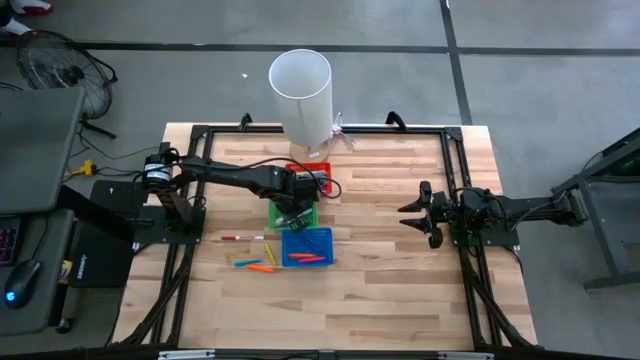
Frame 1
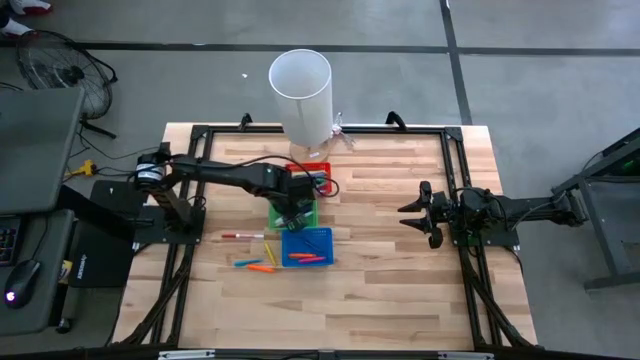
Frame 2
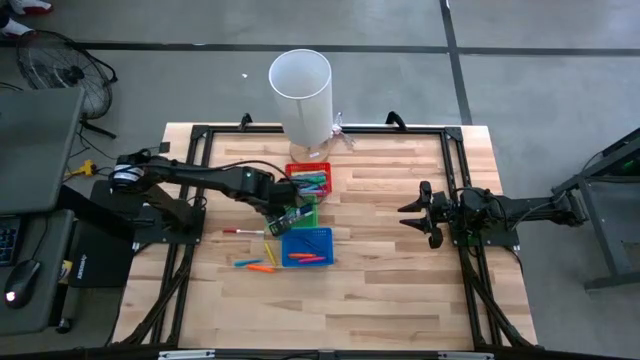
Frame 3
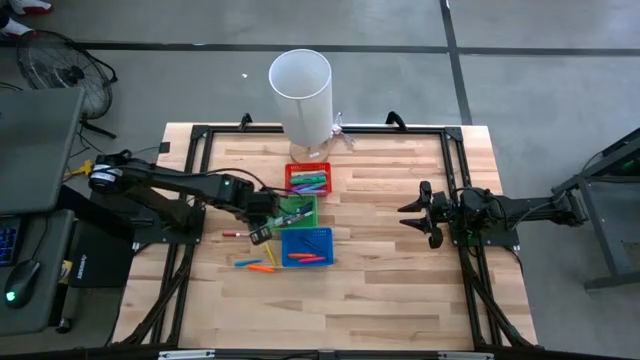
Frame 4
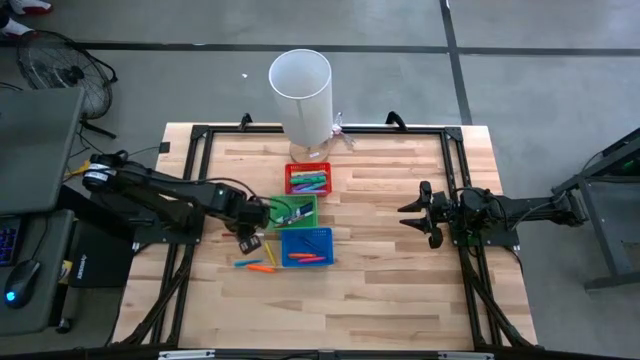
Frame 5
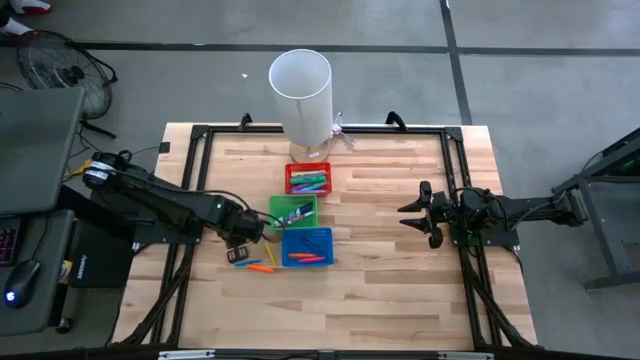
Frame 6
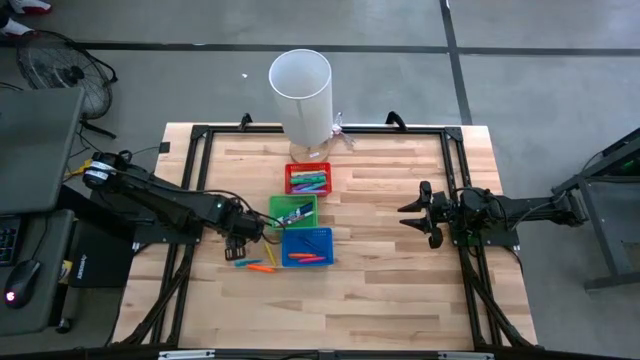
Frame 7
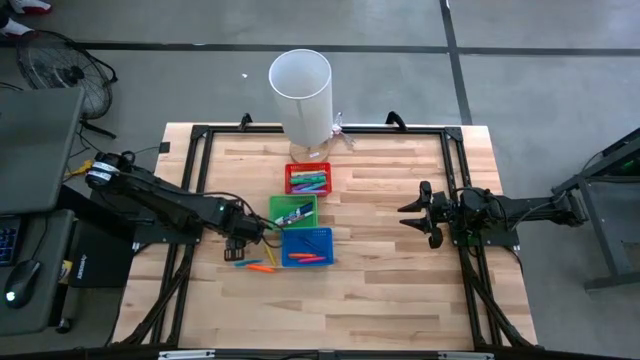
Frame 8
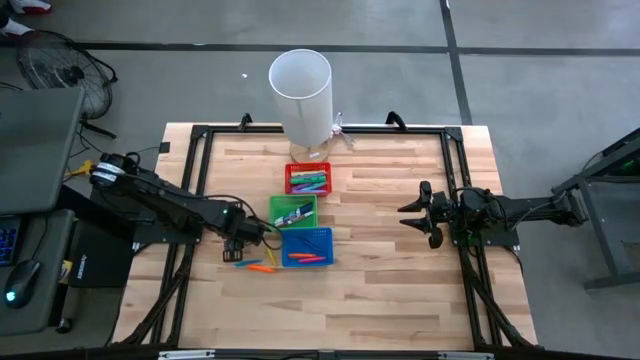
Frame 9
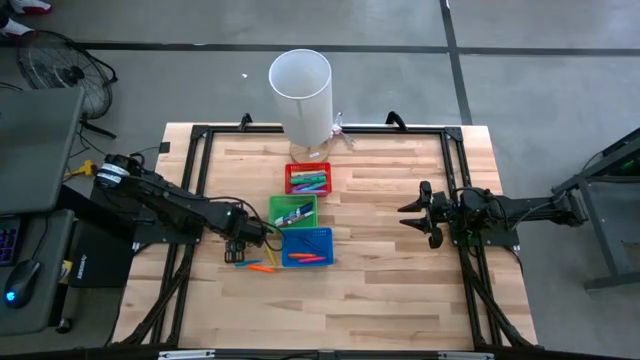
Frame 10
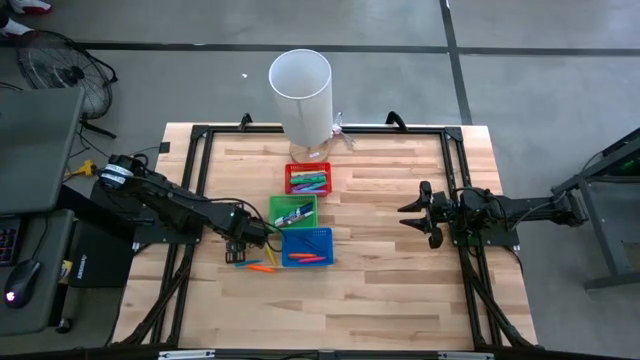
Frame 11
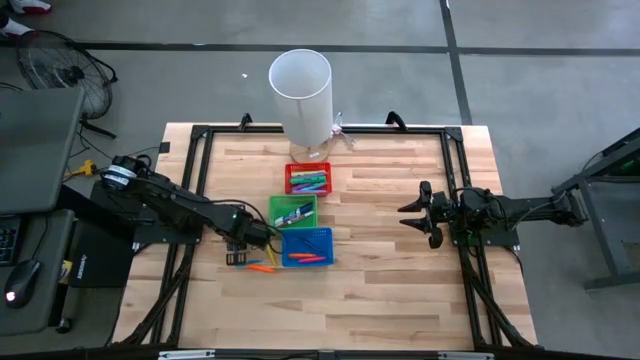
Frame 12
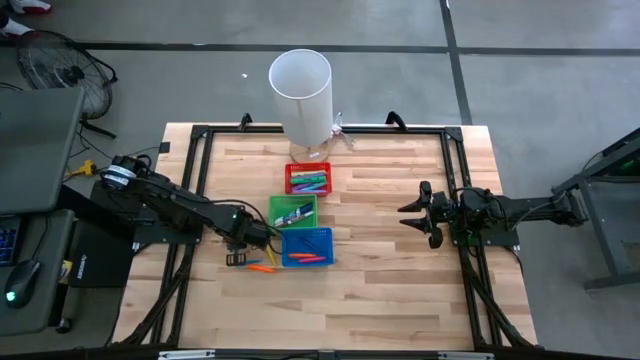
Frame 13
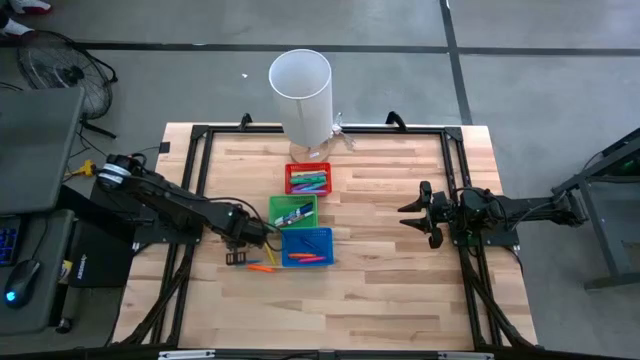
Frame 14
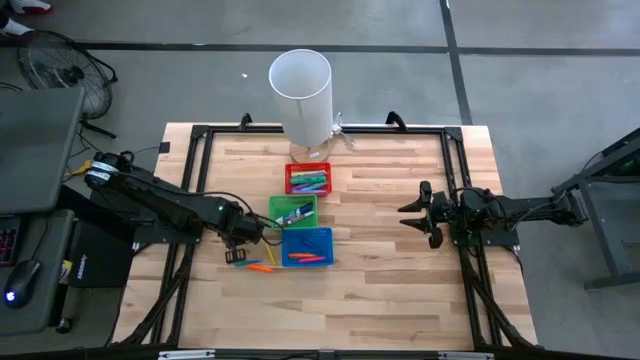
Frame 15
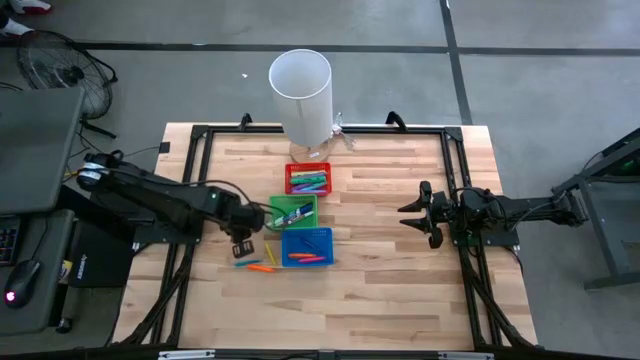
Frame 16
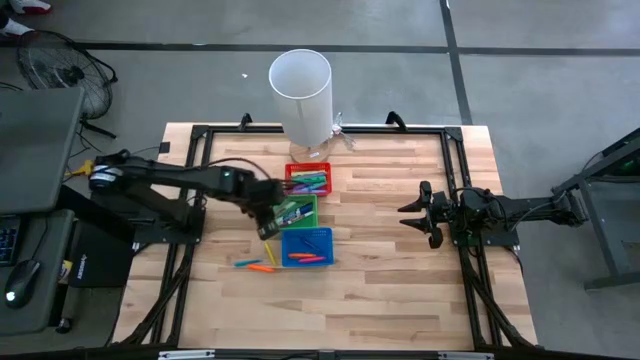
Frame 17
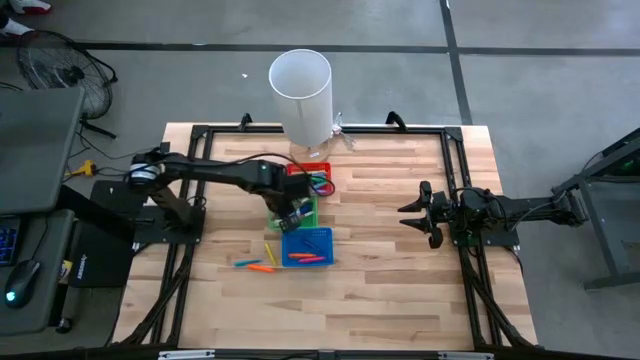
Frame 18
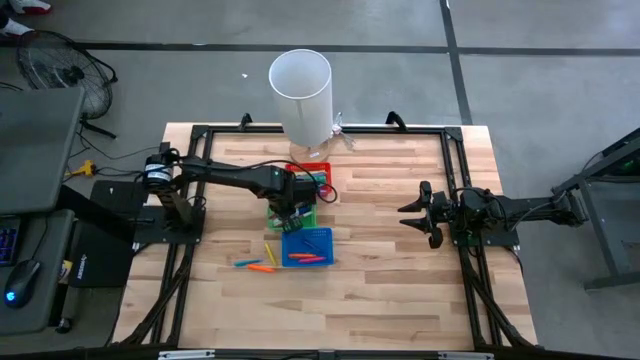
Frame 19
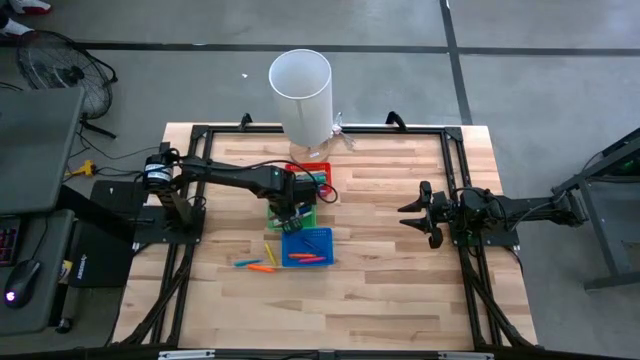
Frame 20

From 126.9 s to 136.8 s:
Task: Pick & Place Markers
Put the white and red marker pen into the green bin

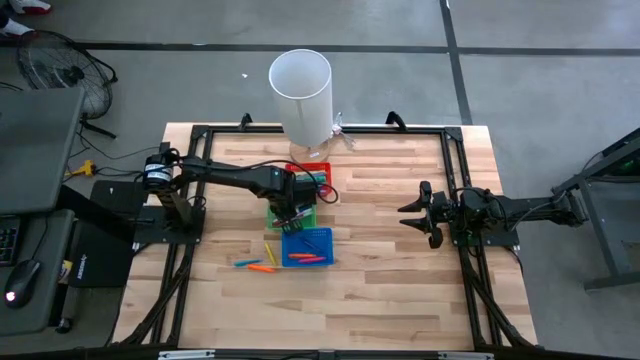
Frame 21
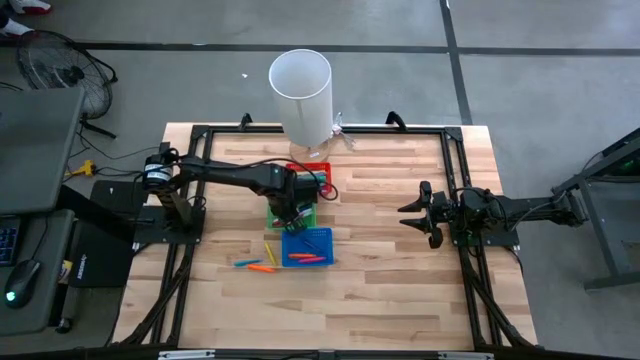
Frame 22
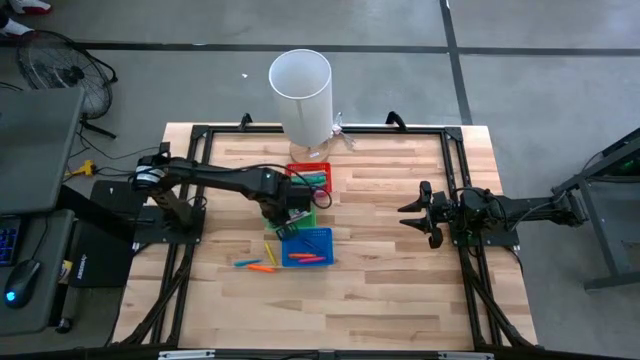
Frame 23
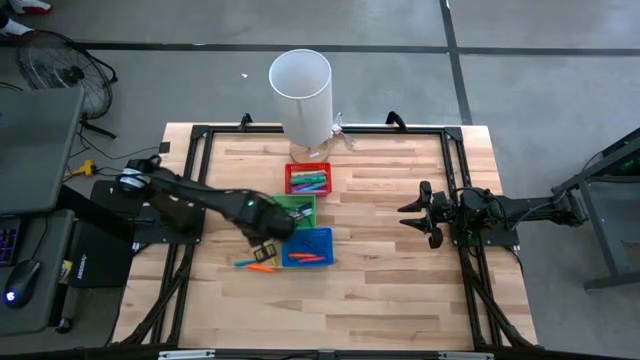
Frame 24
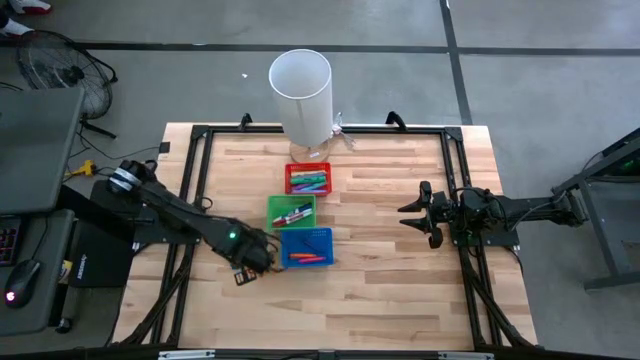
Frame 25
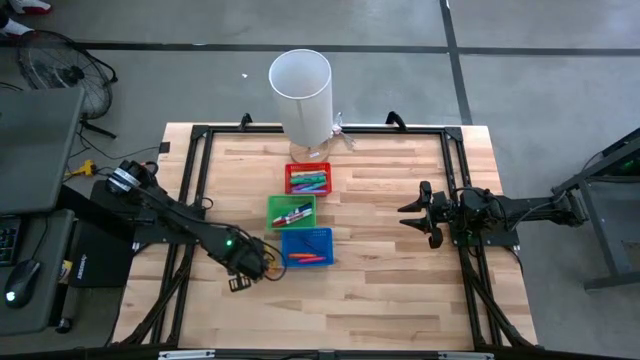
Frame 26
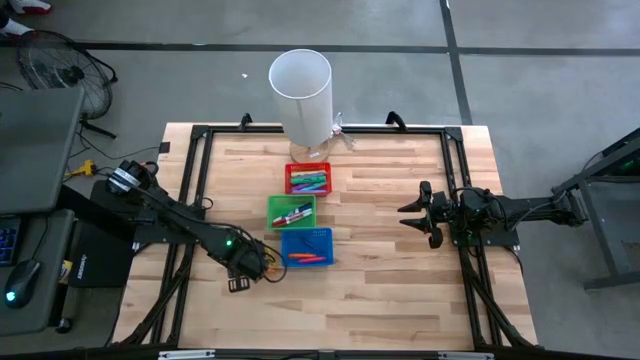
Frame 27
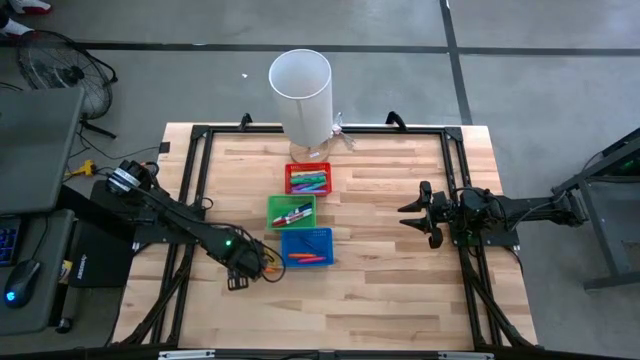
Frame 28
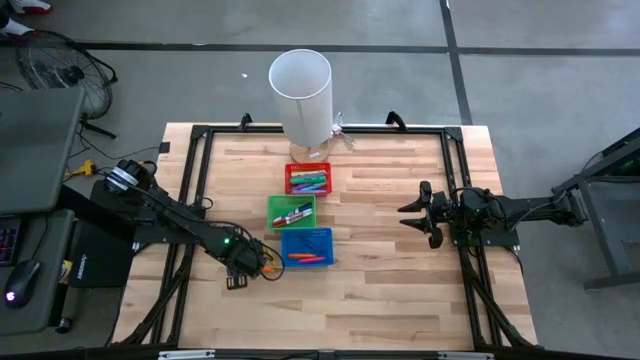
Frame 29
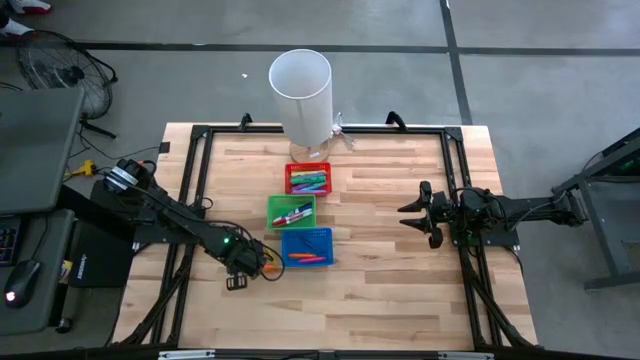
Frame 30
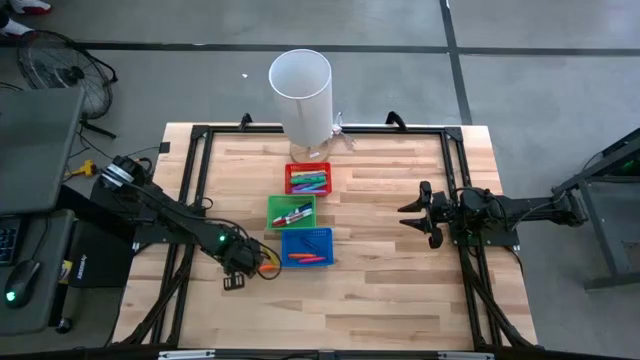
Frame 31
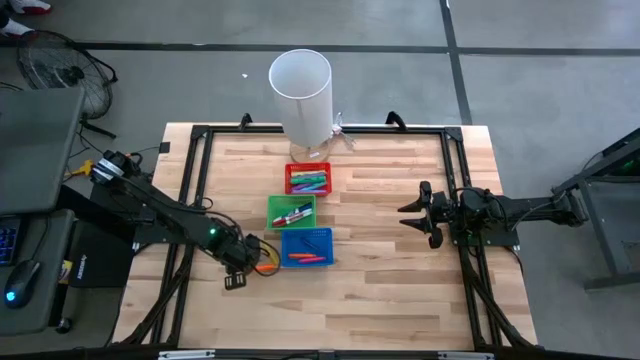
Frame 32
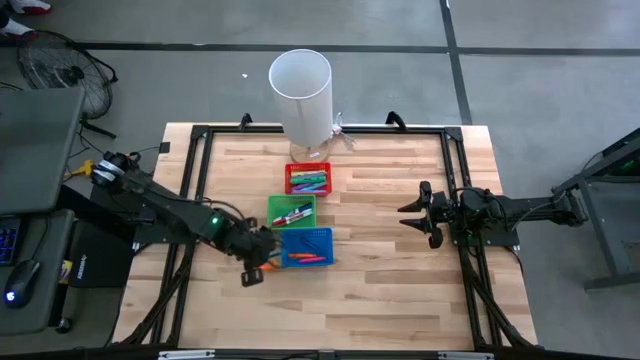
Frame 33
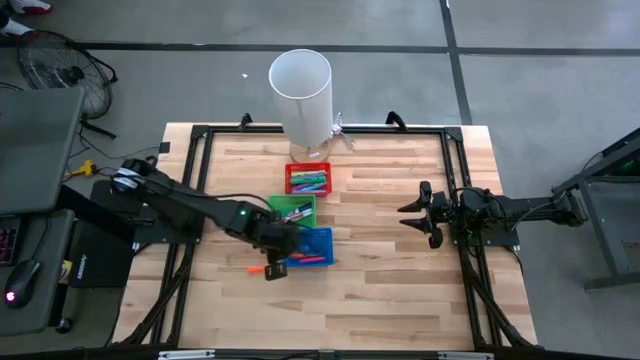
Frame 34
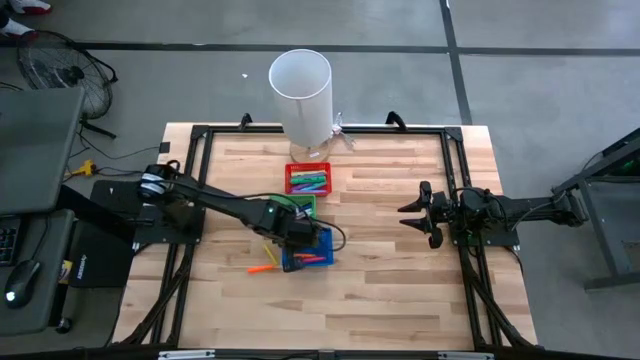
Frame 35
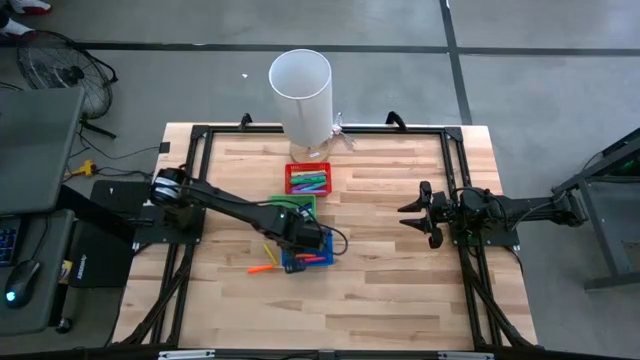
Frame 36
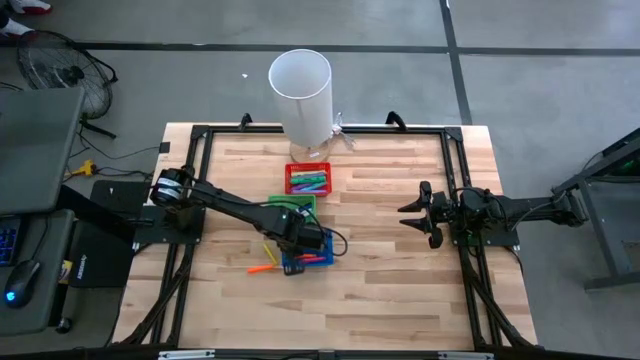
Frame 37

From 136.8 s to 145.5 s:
Put the blue pen into the blue bin

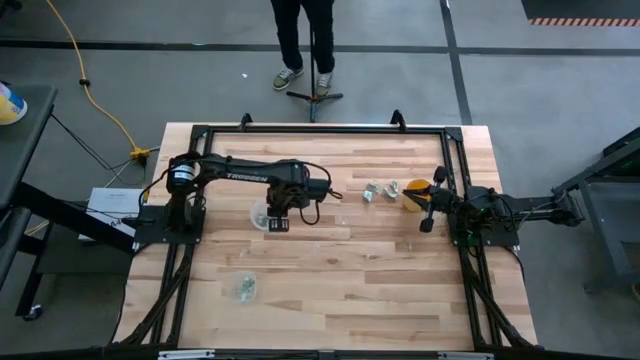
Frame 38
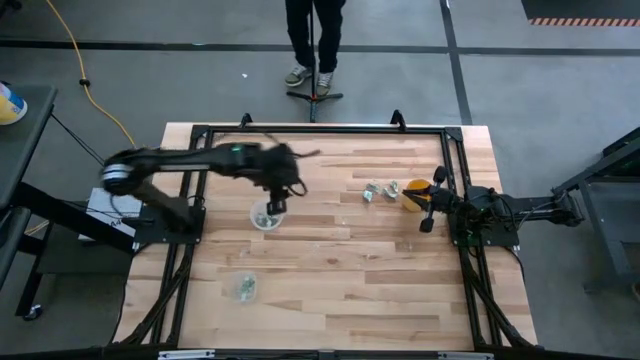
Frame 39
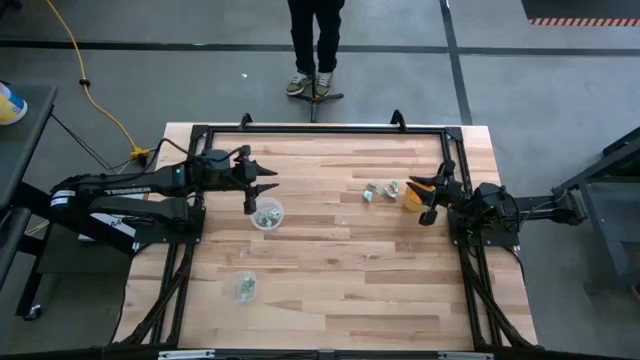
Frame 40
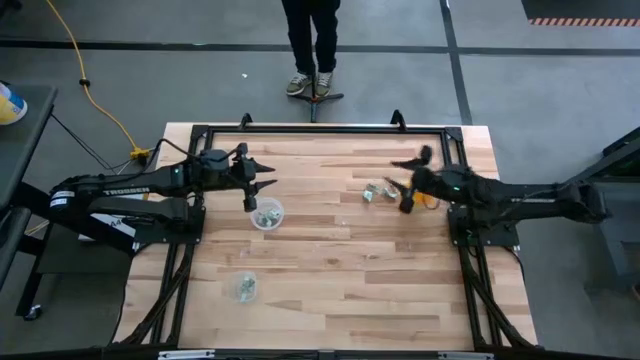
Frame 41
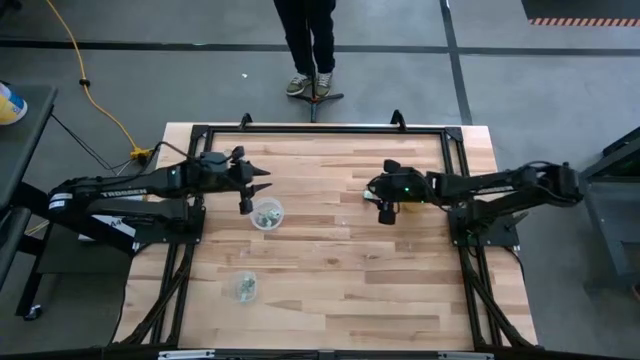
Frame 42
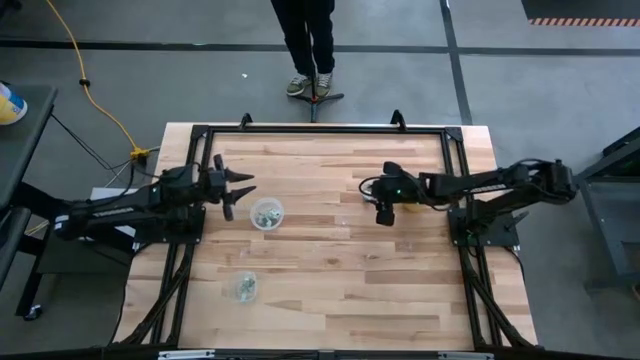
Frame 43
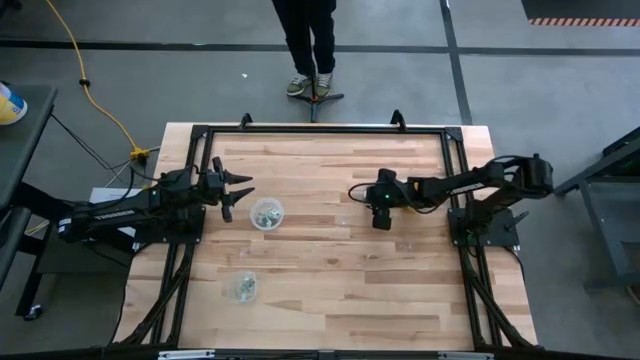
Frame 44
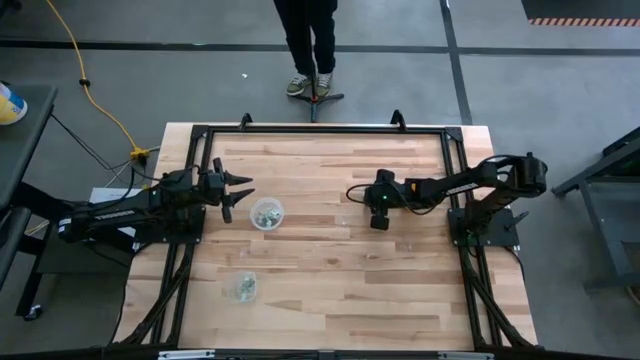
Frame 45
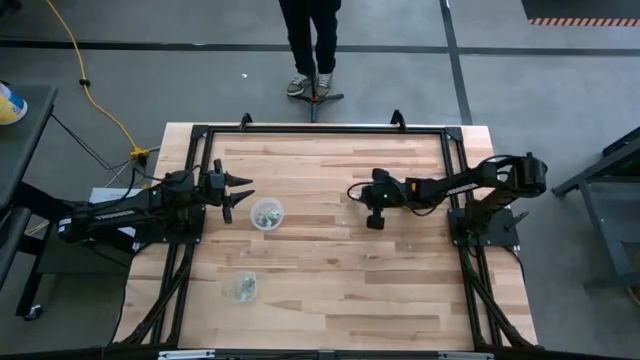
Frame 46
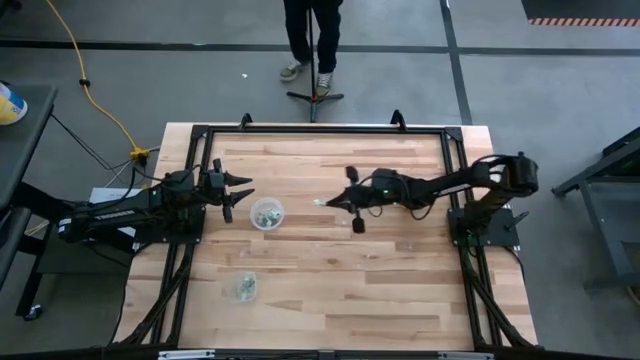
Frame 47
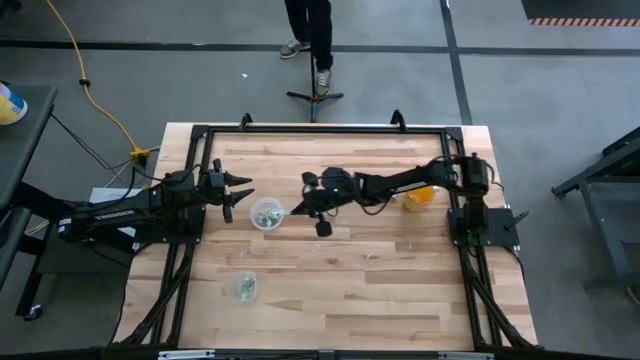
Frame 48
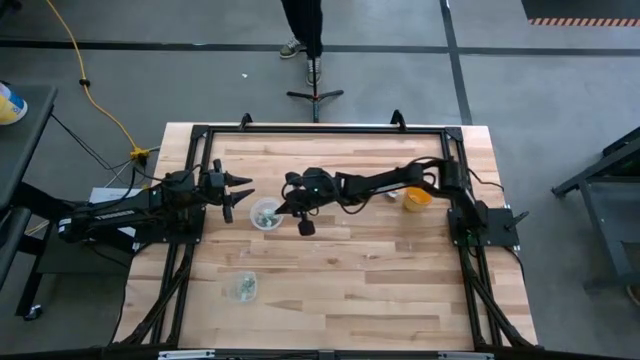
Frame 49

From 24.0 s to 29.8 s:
Task: Pick and place Stevia / Truvia into bins
Put the stevia packet in the top transparent container
